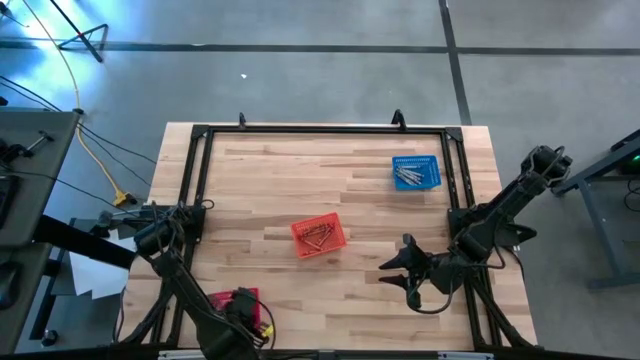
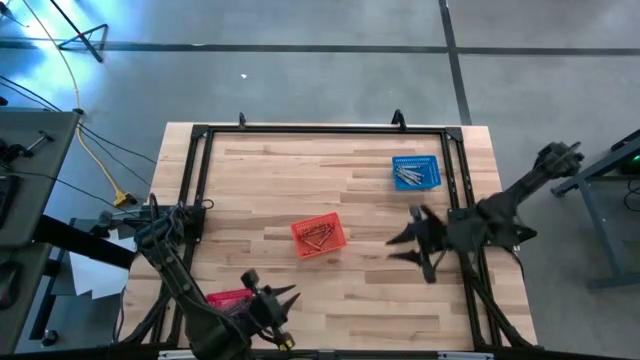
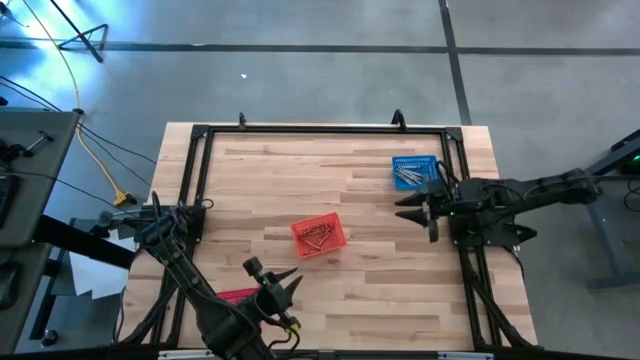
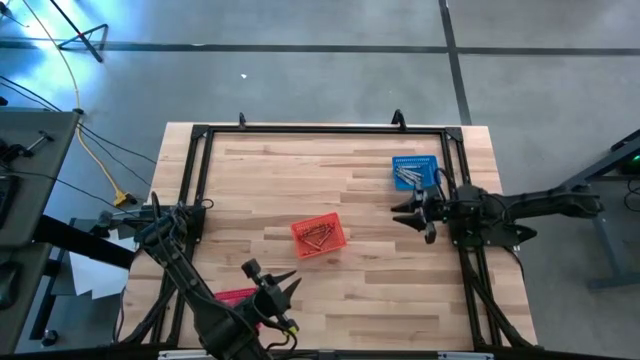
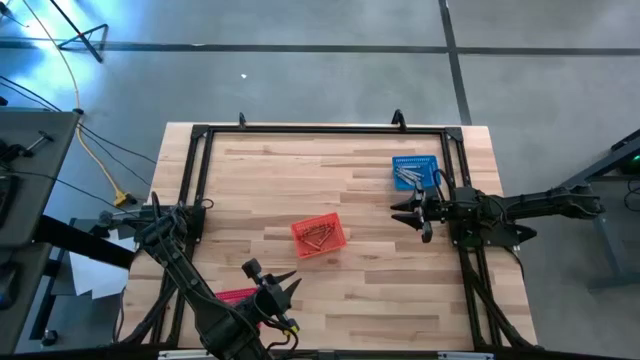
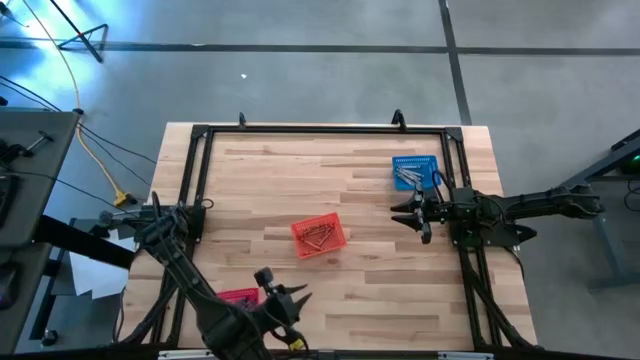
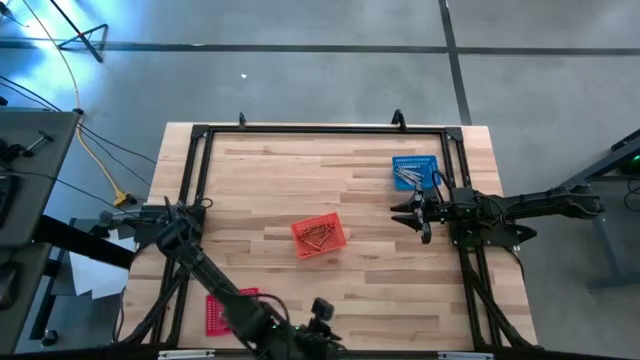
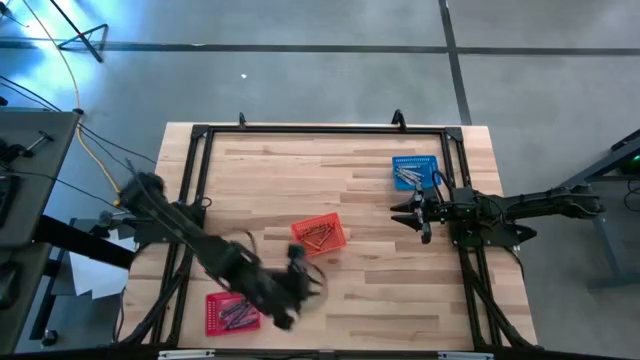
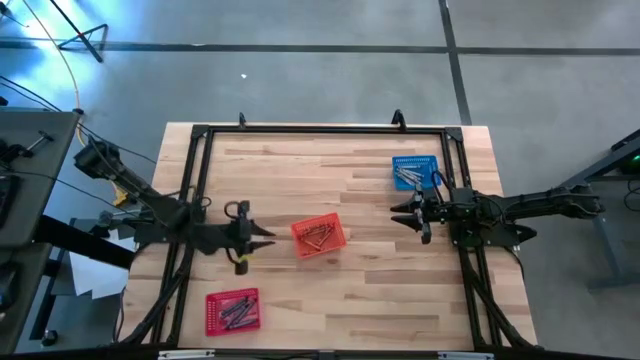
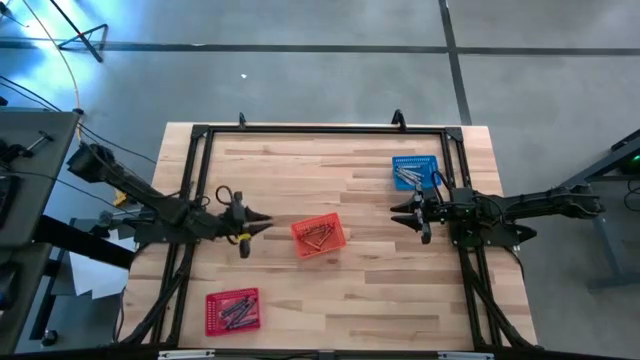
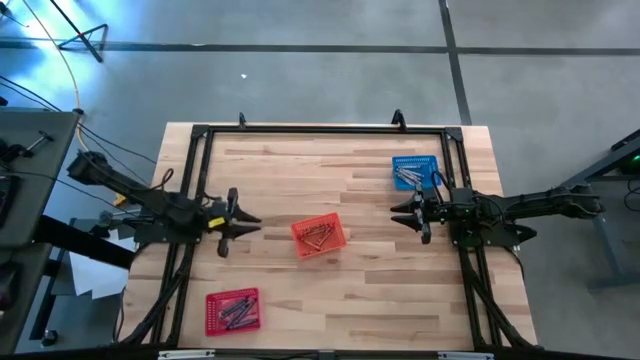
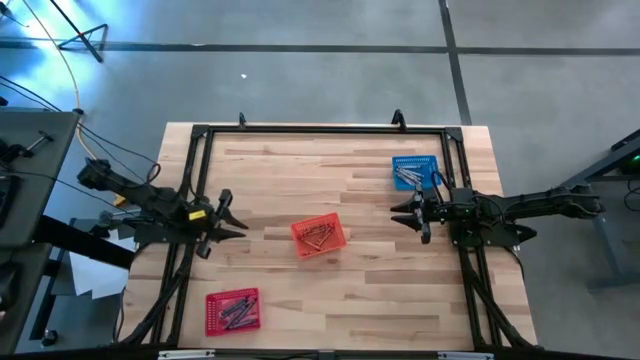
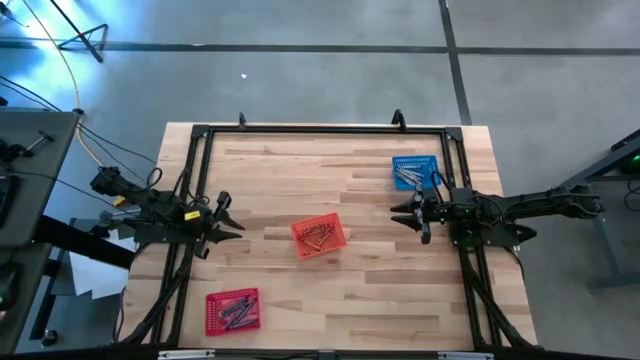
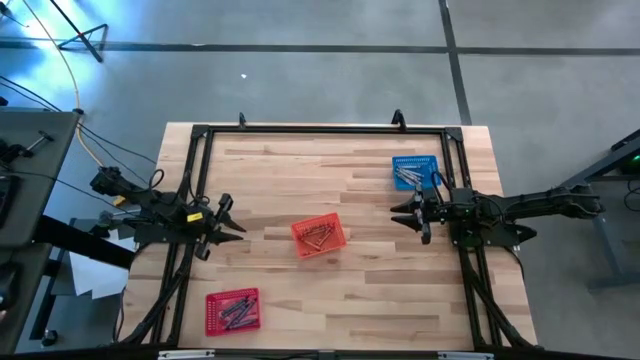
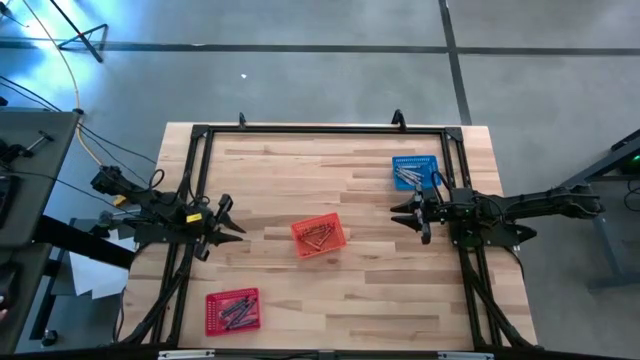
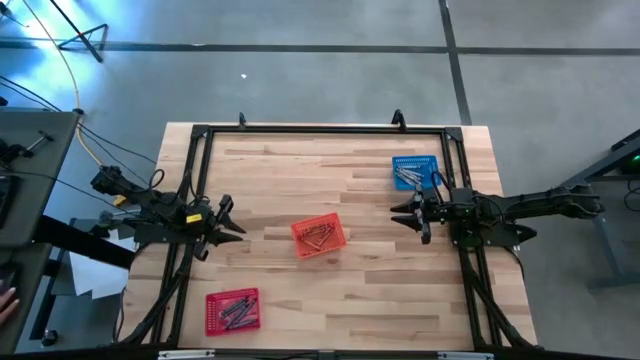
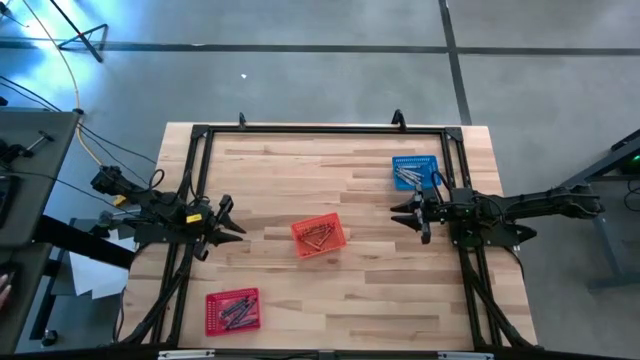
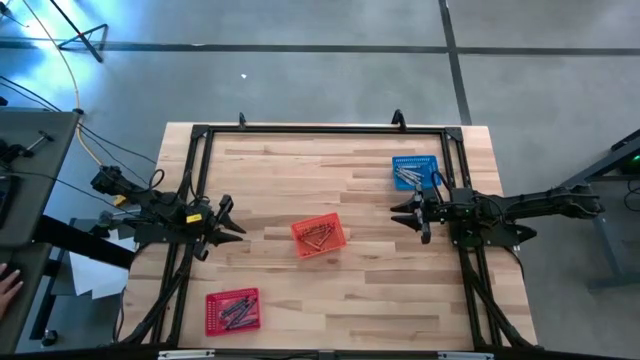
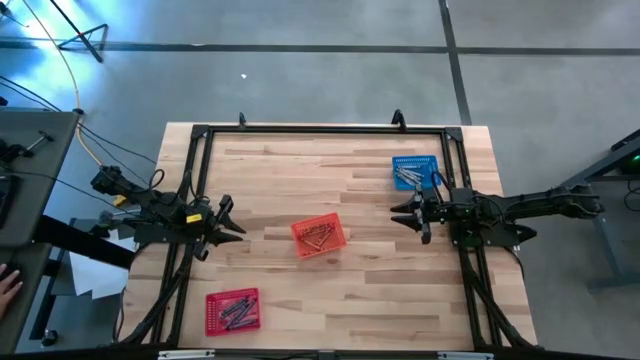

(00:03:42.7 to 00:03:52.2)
Task: Sort crayons
Return to Home Position

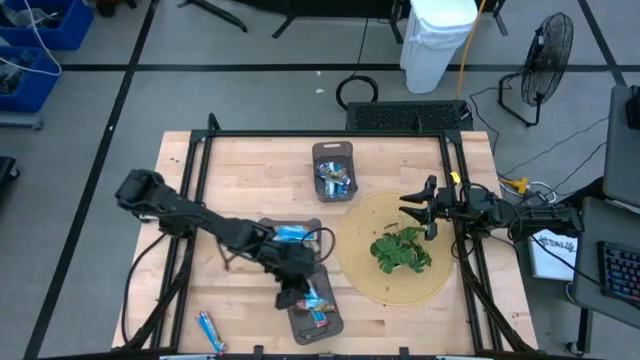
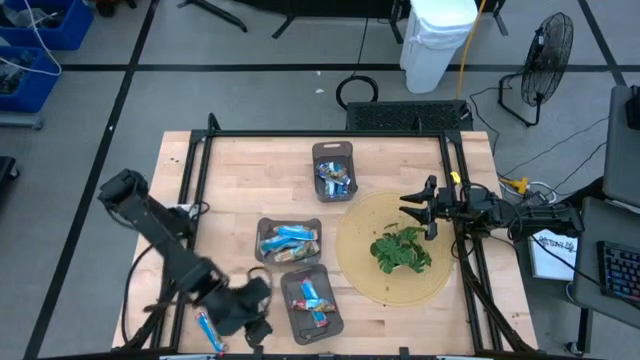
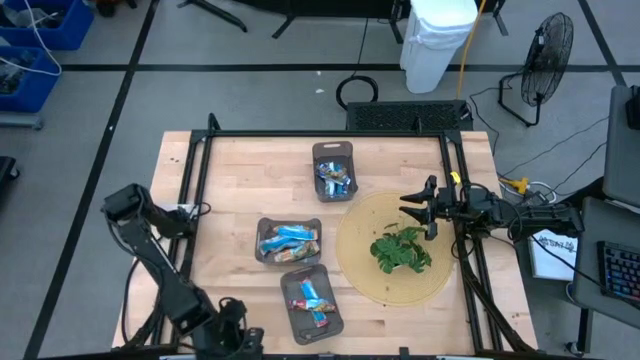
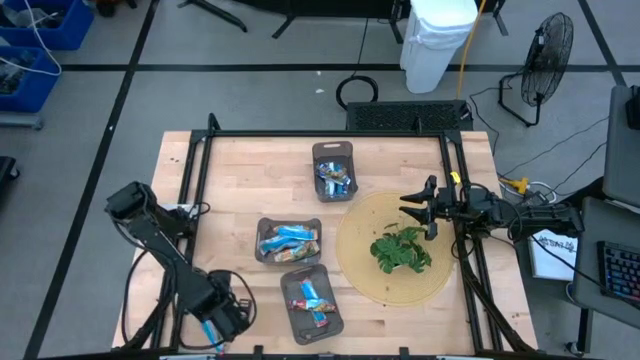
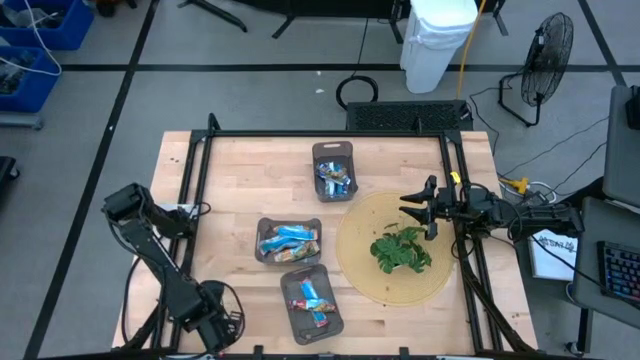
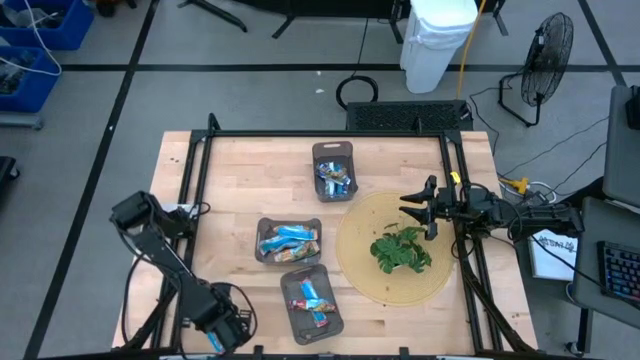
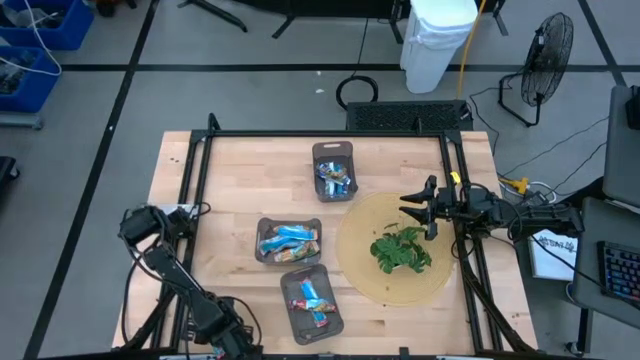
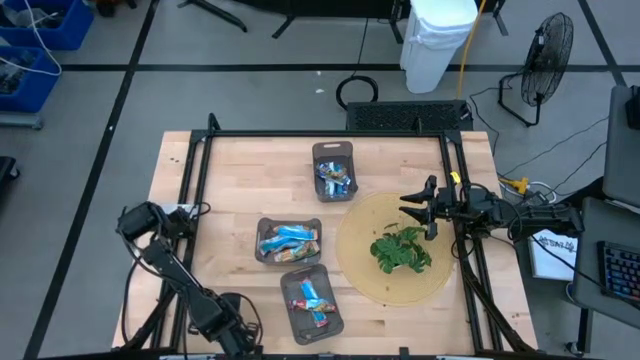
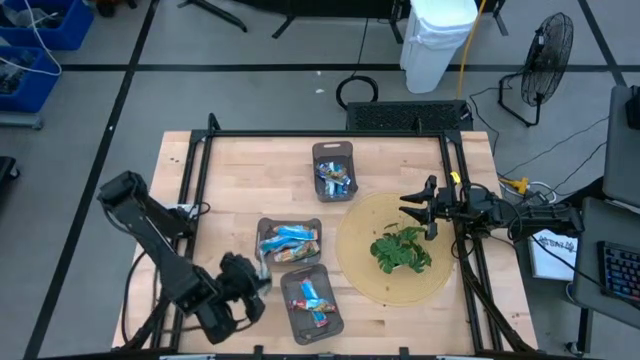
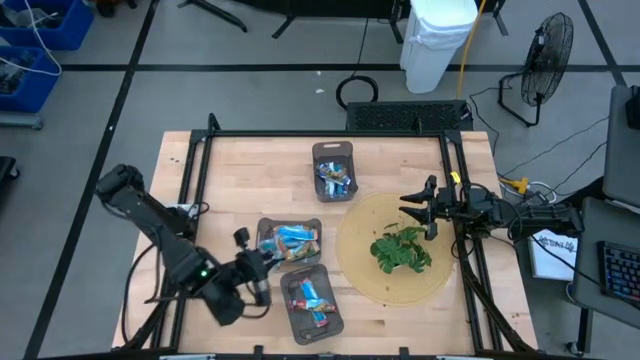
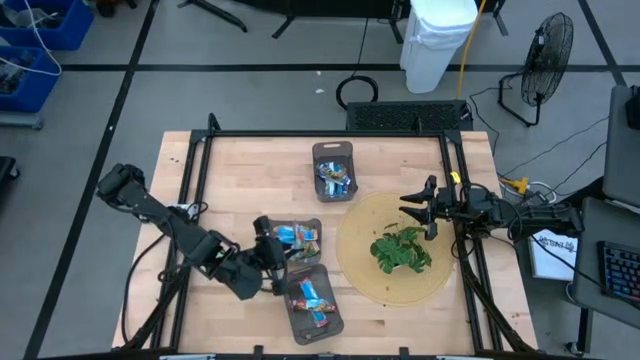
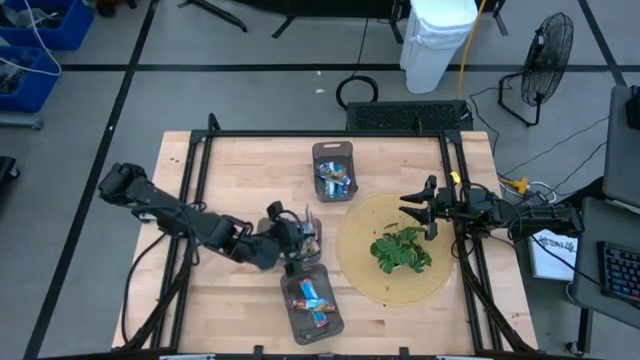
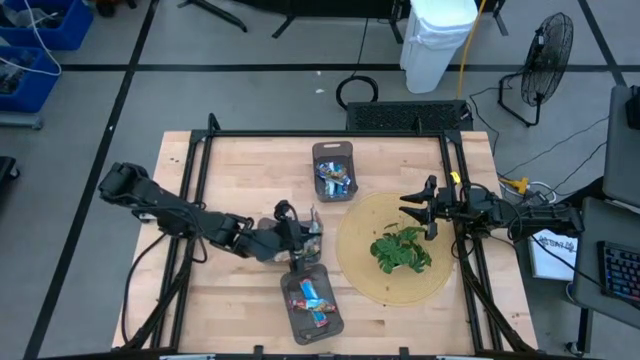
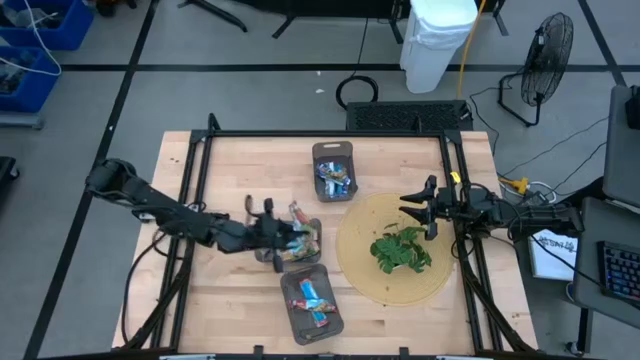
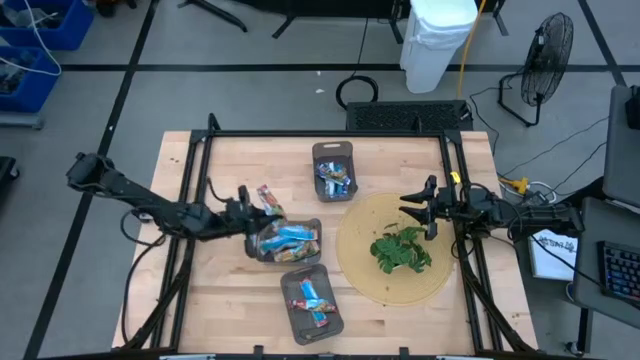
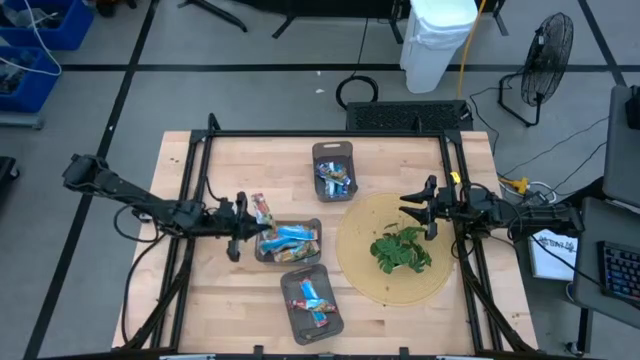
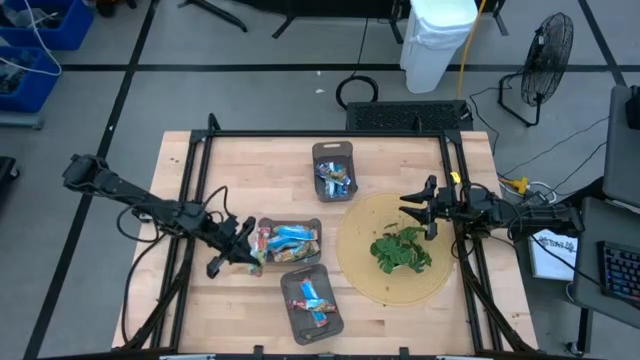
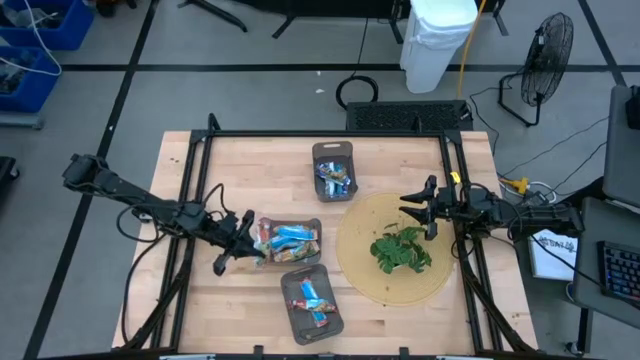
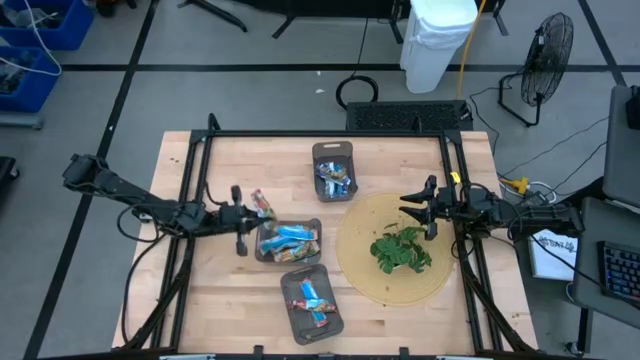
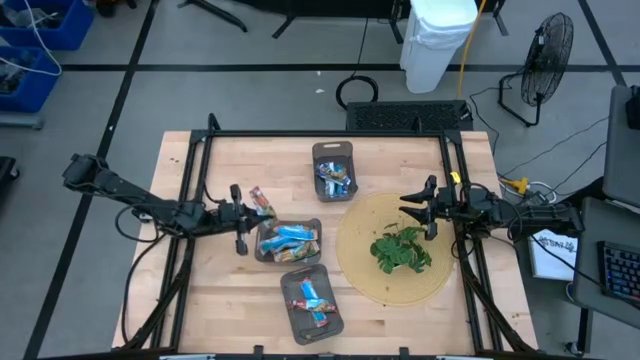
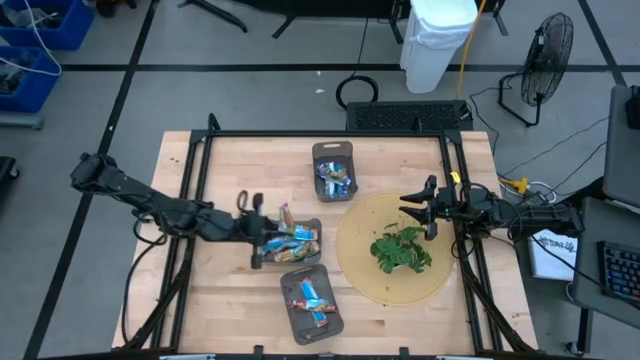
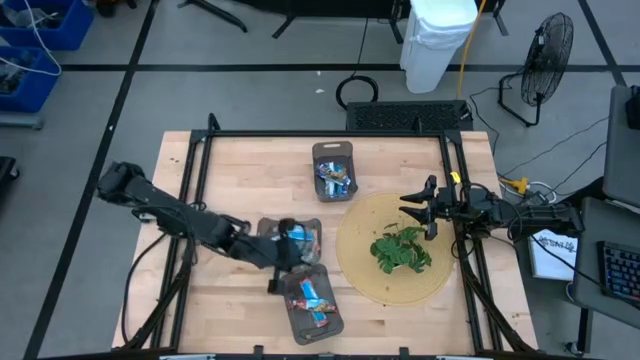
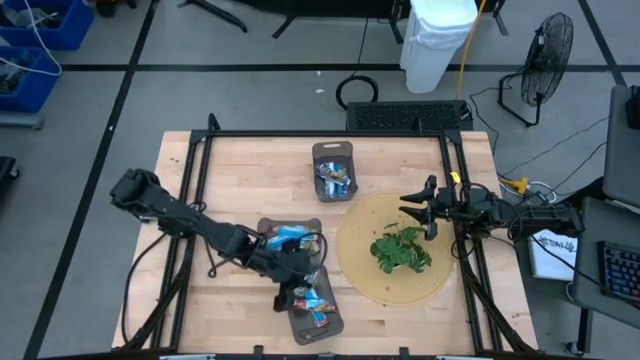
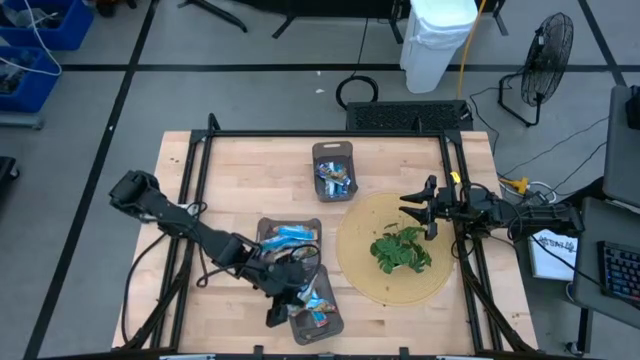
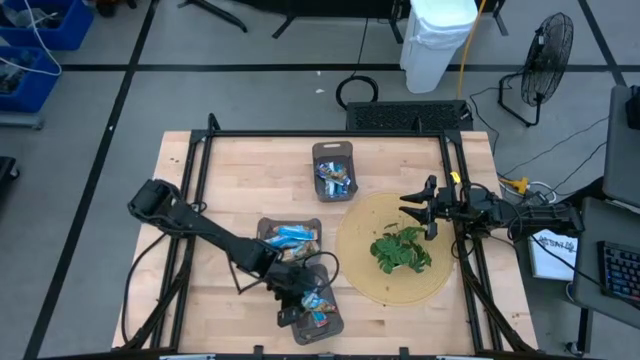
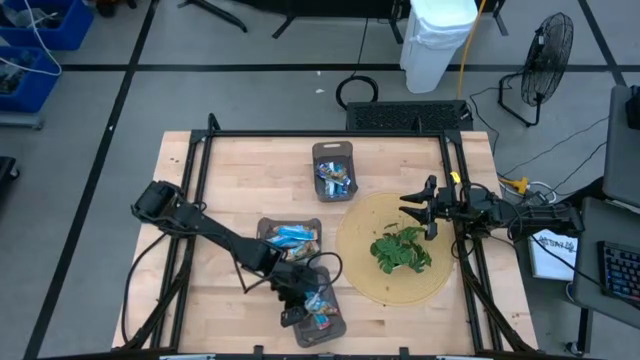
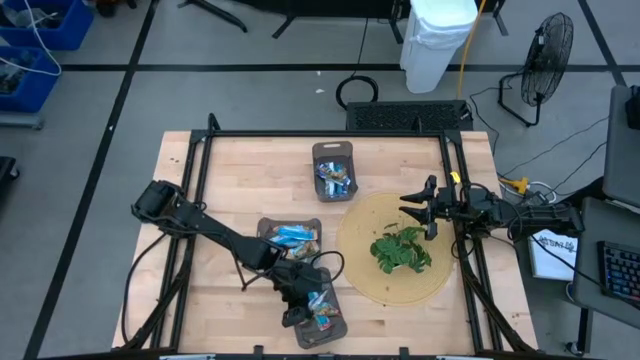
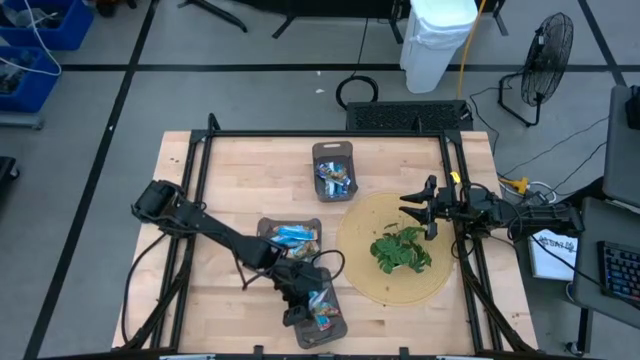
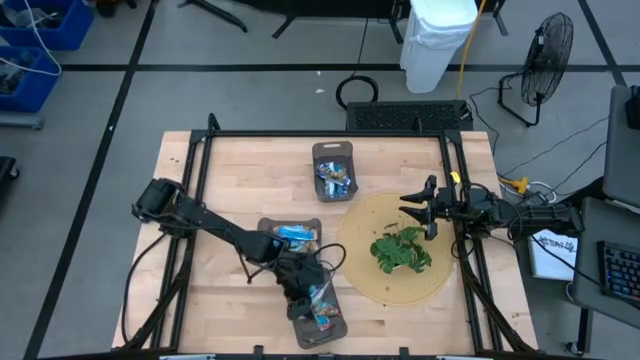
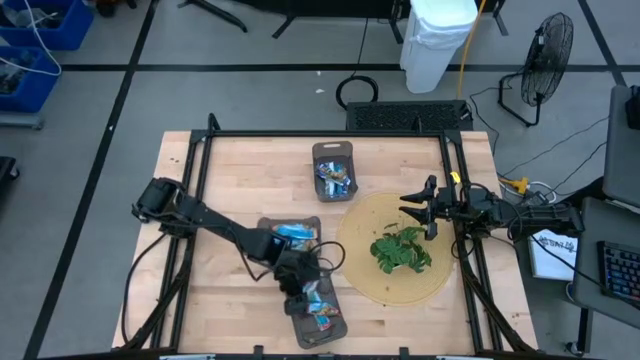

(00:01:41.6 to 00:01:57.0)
Task: Pick and place Granola Bars by type
Put the red granola bar into the bottom black bin
